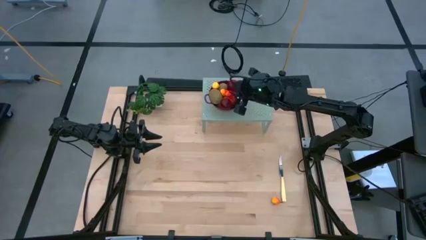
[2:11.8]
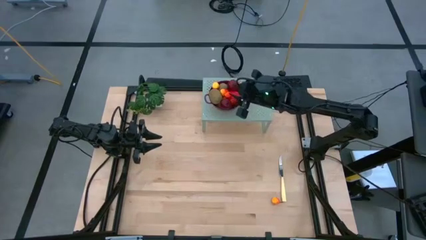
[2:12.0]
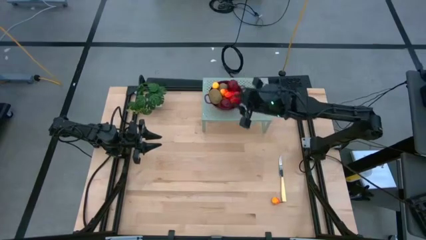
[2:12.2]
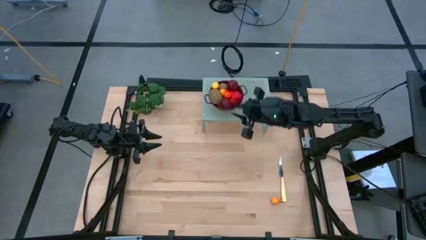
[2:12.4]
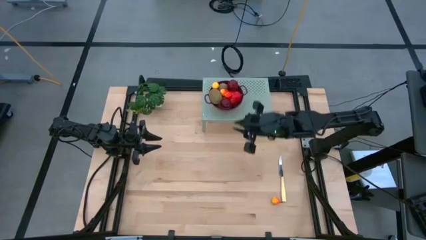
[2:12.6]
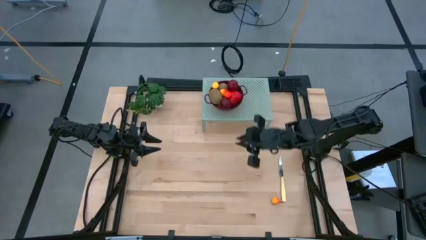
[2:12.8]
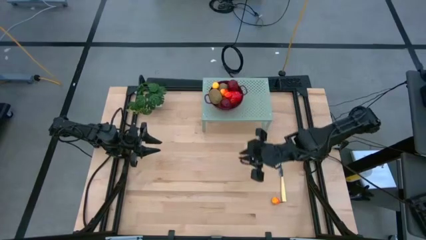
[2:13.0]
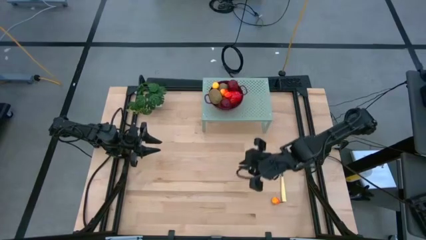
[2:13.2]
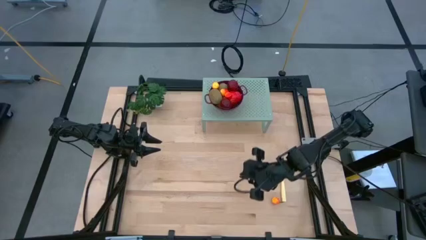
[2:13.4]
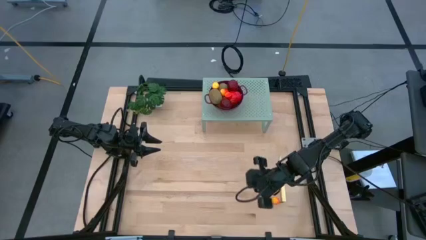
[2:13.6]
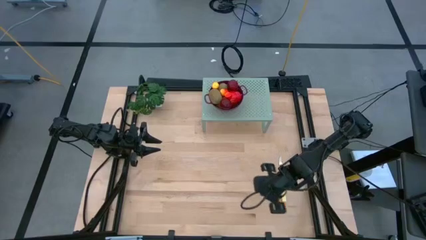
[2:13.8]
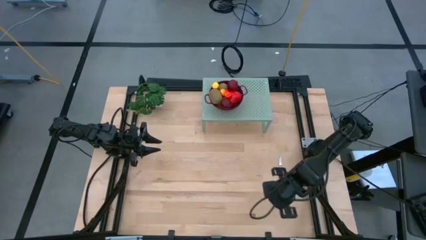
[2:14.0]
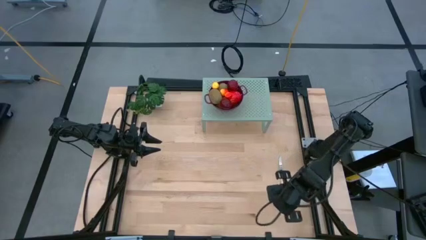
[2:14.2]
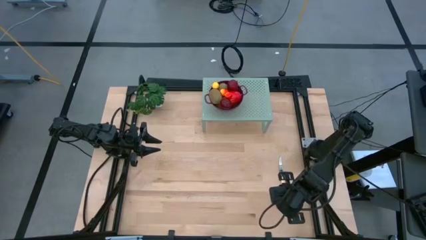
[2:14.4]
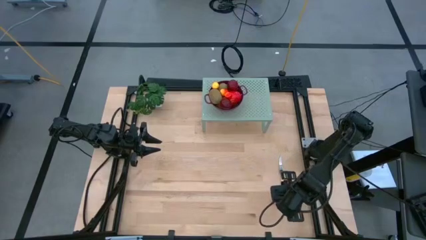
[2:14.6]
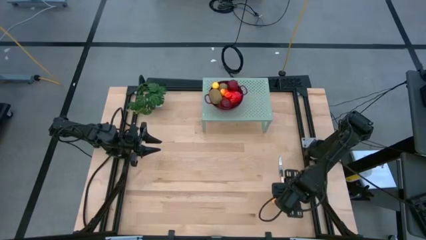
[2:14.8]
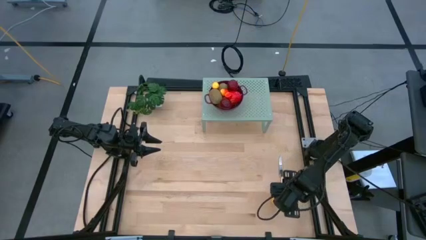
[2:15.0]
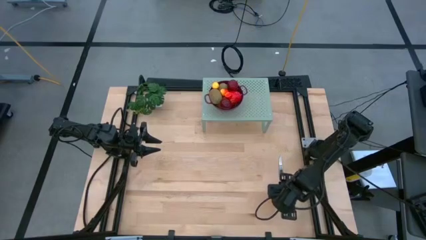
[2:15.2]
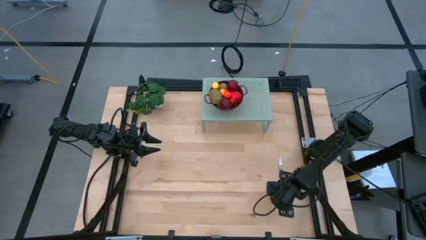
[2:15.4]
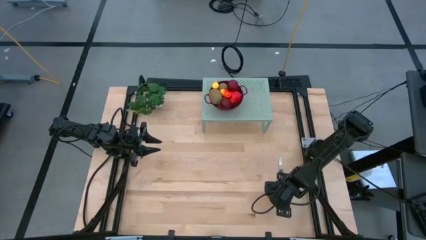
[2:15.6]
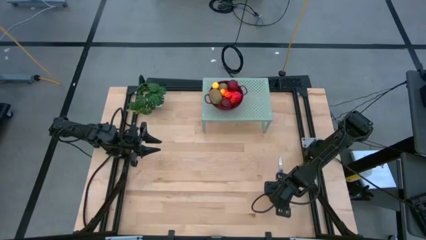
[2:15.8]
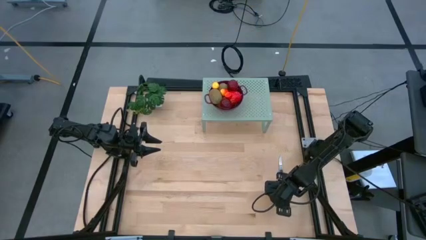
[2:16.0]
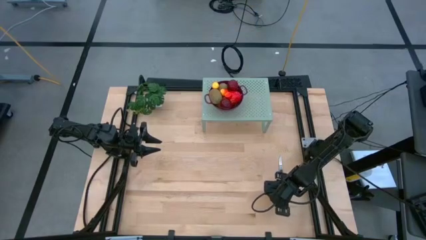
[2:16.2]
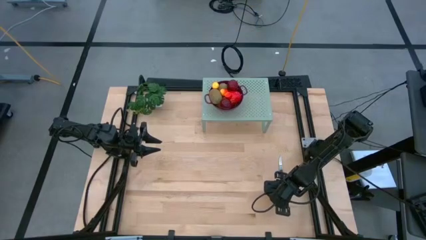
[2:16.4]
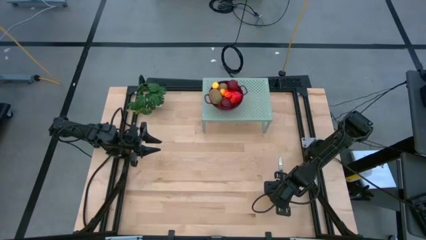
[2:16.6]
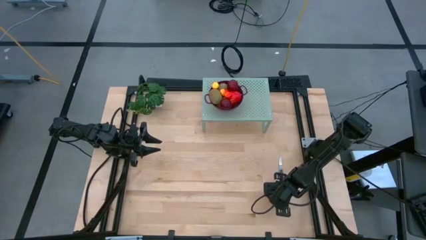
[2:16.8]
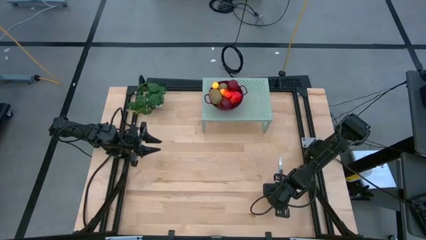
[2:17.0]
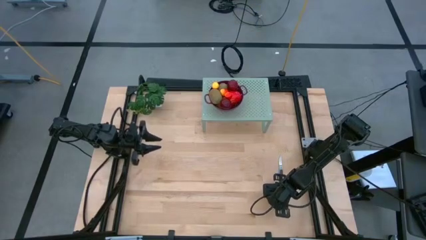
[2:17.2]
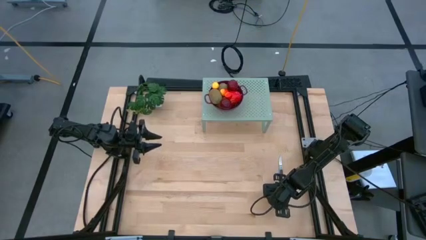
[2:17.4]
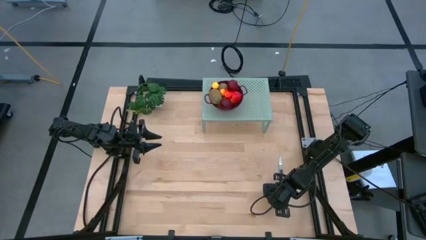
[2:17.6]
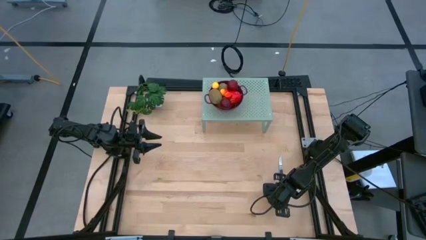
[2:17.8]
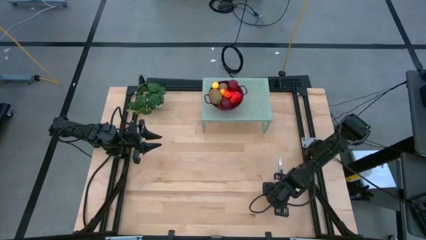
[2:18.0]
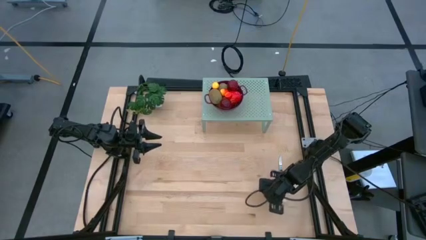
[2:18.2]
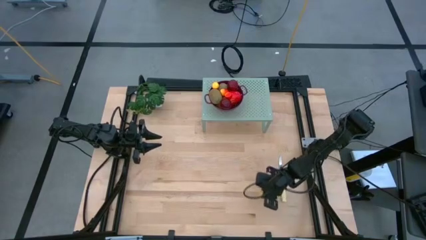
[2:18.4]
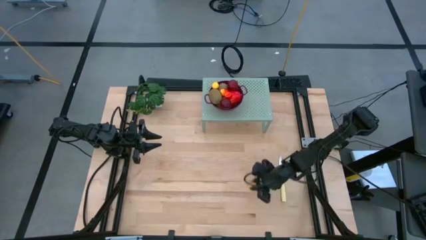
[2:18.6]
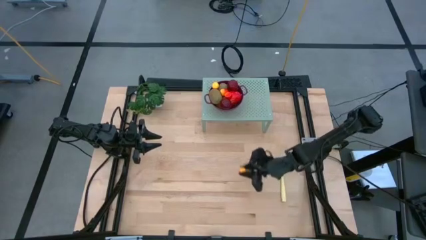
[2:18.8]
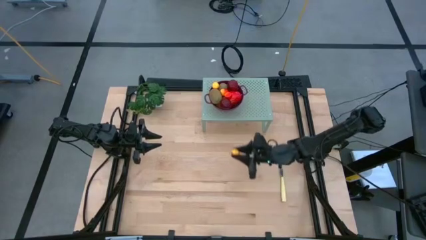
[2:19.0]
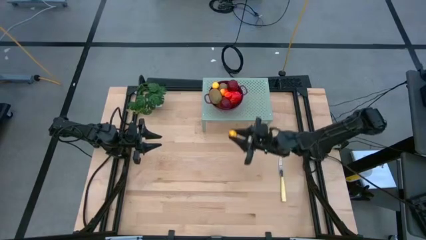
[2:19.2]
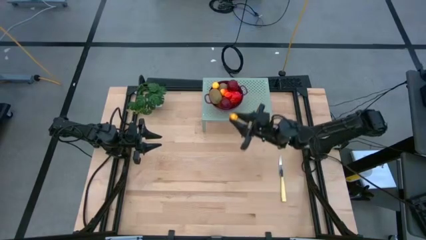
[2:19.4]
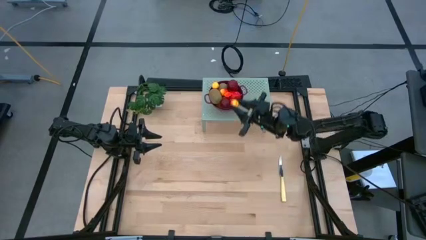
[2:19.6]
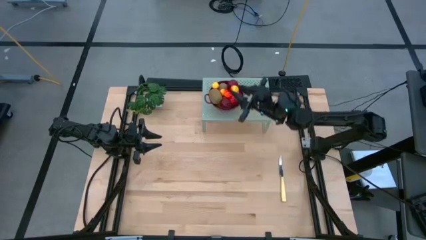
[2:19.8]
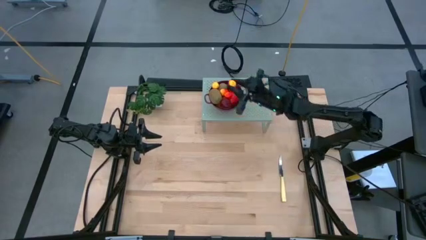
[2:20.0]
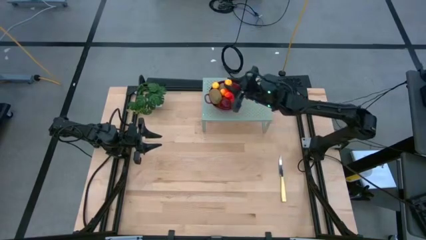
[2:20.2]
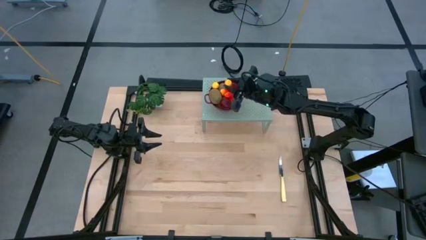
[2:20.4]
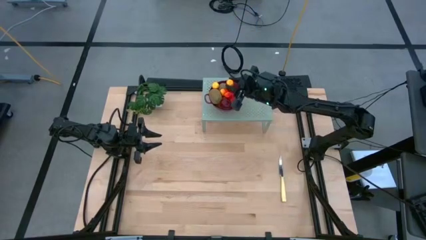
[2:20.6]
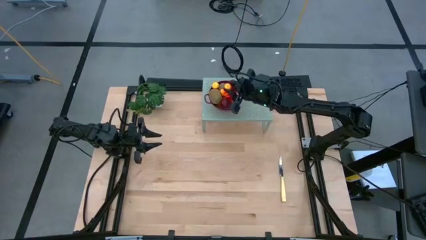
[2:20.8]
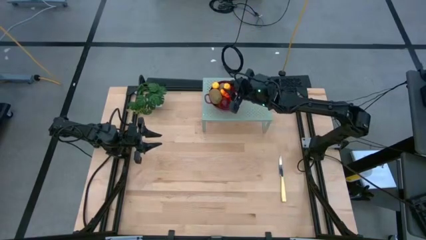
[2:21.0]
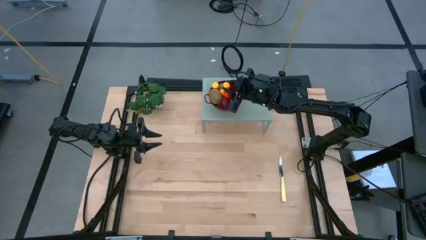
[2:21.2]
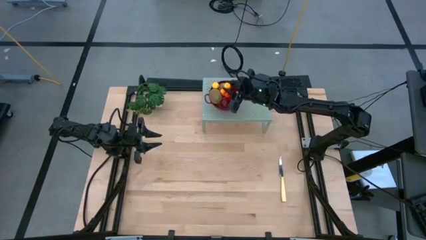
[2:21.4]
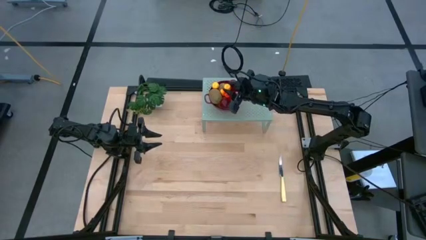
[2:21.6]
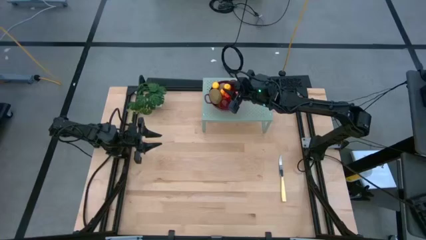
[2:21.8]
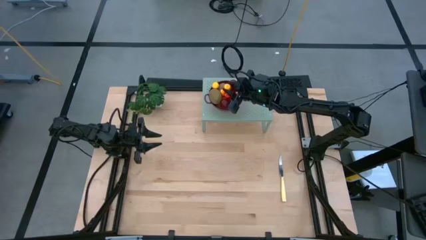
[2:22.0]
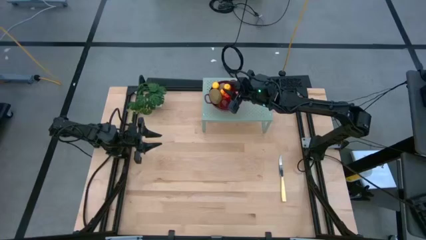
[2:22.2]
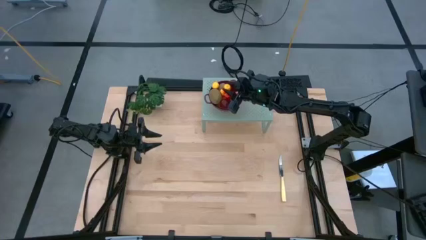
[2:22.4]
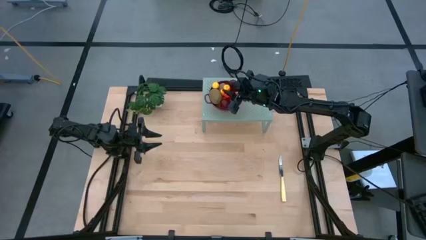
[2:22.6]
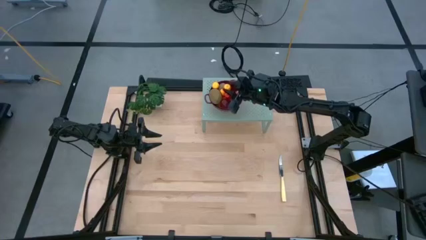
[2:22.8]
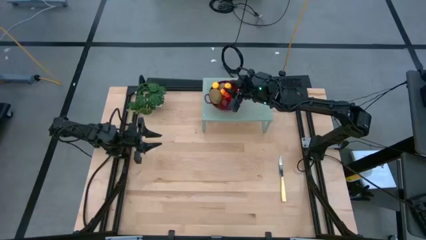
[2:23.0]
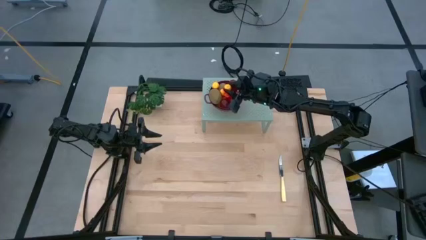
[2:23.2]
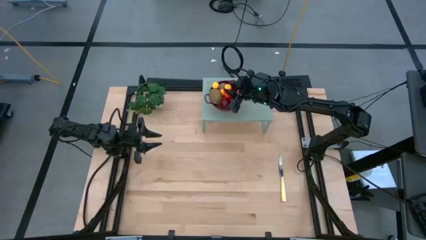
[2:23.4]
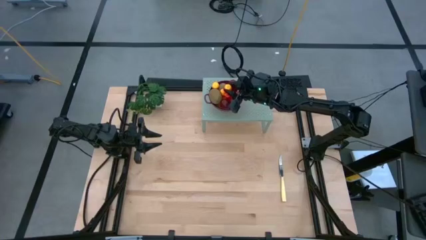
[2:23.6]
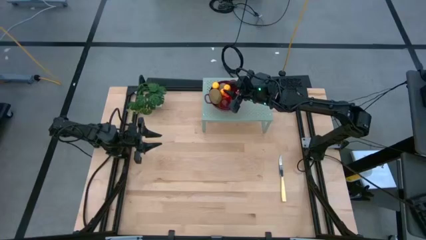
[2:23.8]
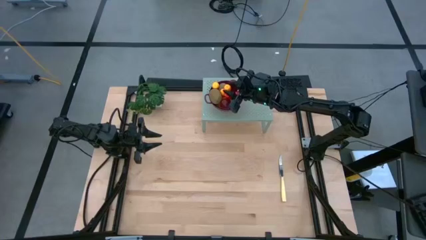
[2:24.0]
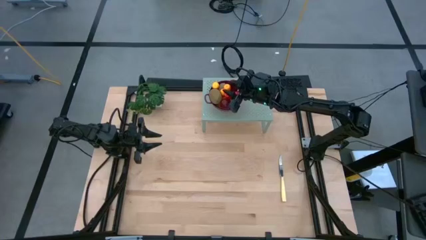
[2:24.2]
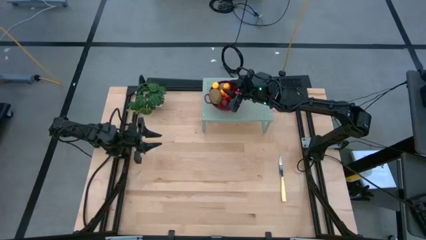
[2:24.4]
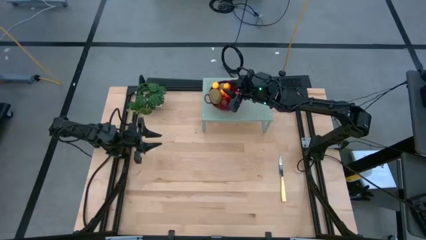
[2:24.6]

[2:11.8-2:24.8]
Task: Pick & Place Fruit
Put the pear in the violet strainer bowl on the shelf

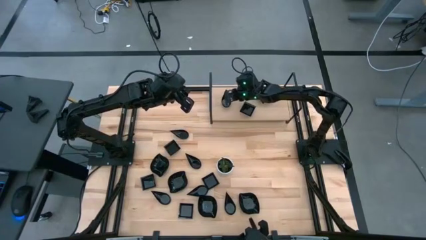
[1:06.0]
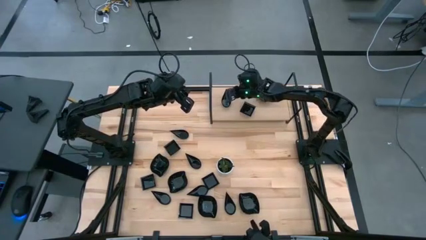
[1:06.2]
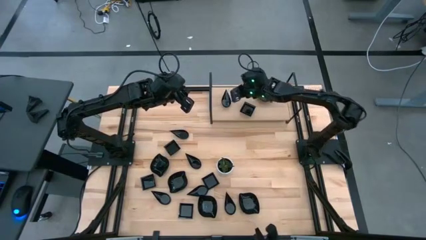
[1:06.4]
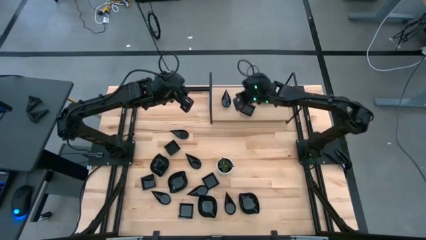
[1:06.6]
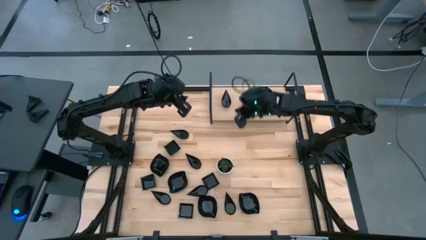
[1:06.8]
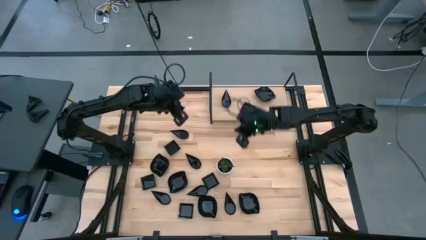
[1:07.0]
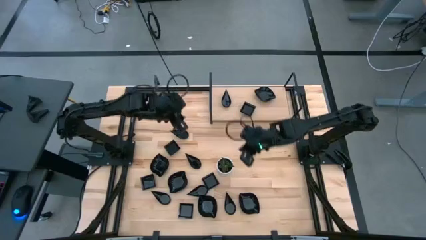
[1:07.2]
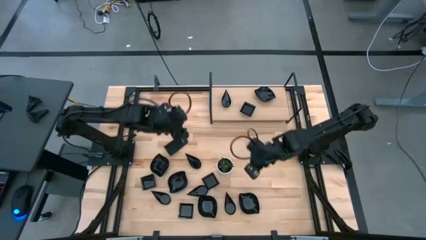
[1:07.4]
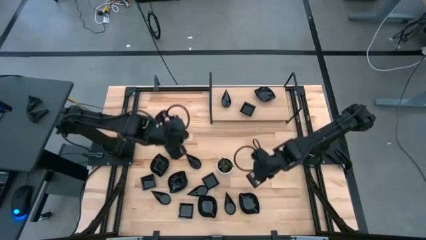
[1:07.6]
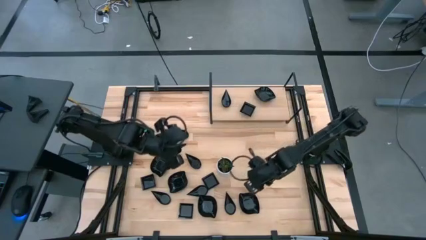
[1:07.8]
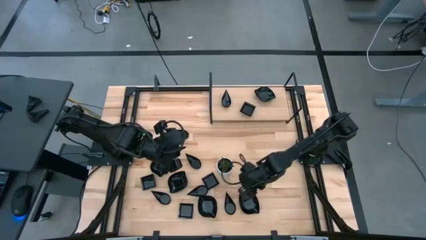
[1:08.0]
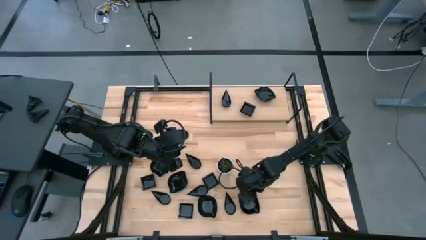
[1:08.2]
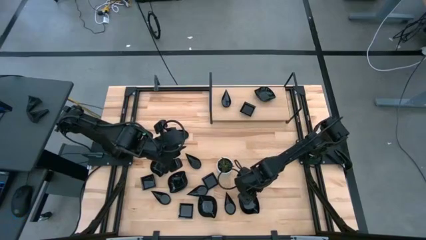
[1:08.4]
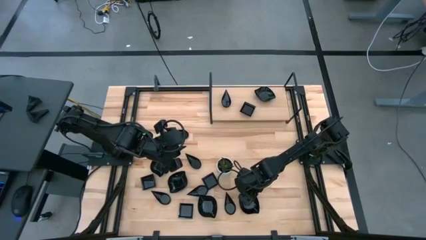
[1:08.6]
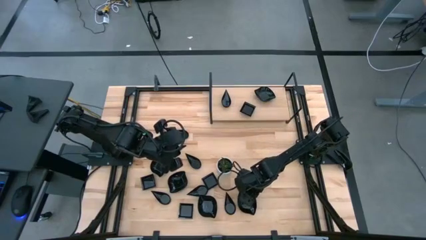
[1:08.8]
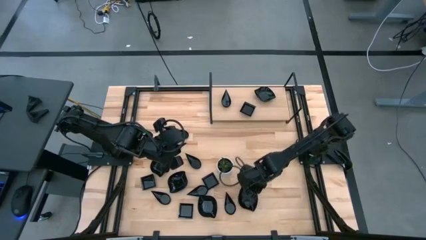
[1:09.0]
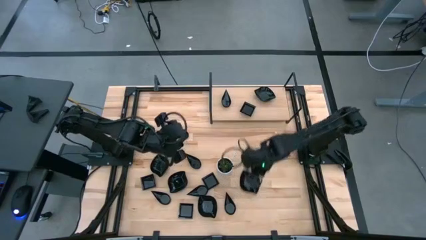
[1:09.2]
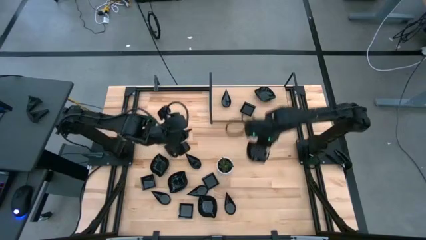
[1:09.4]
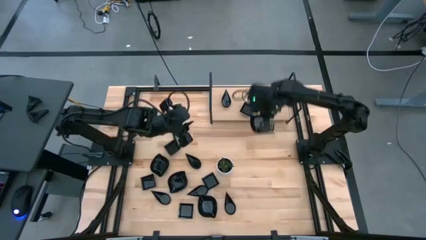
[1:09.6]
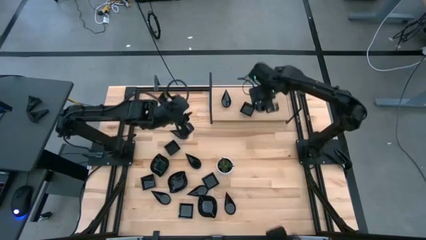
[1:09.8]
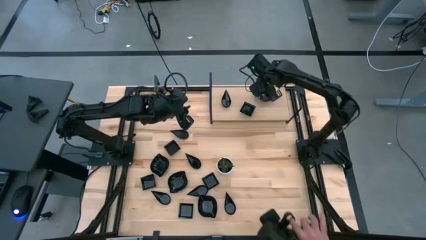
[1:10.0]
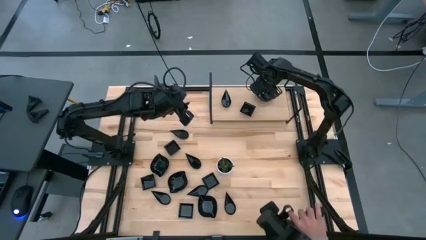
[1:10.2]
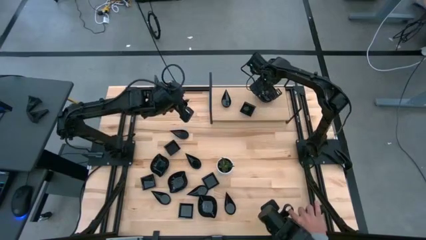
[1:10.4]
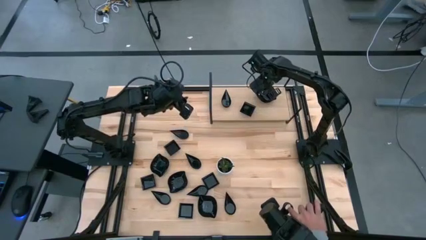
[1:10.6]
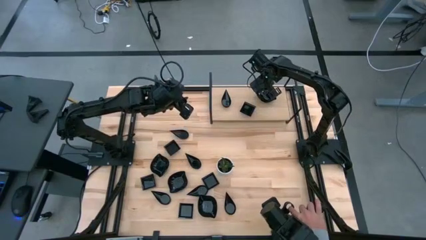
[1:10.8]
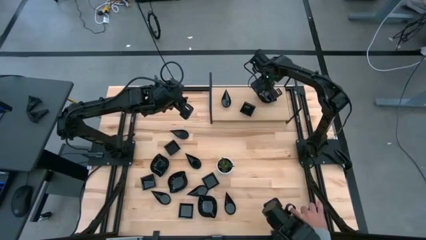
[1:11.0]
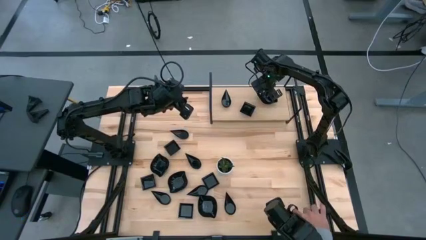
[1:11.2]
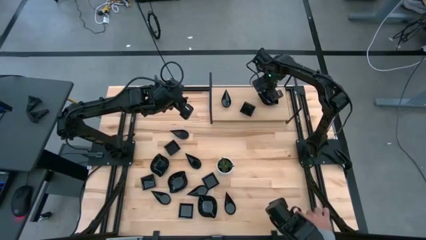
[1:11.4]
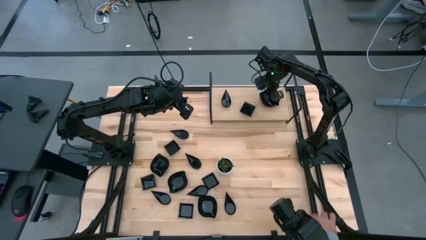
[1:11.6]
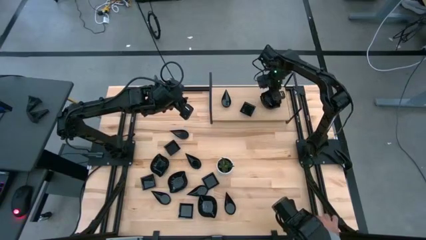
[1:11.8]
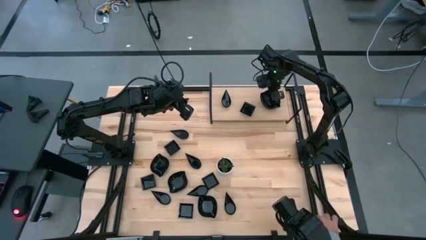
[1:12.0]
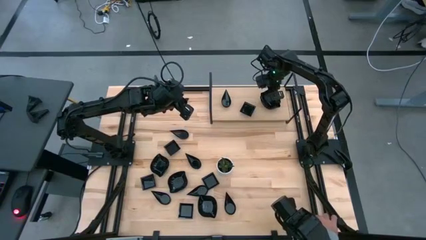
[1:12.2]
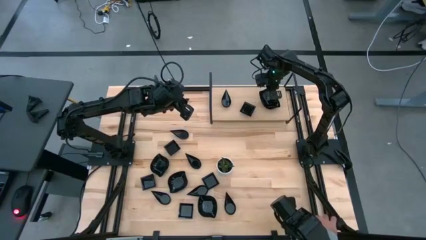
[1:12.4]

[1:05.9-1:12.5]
Task: Pick & Place Mini shaped plates
Stack the leaf shaped plate on top of the leaf shaped plate on the shelf
